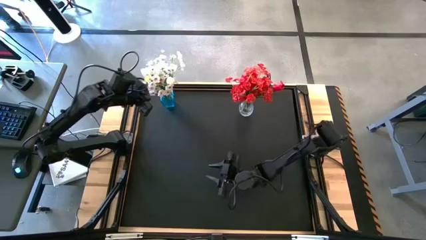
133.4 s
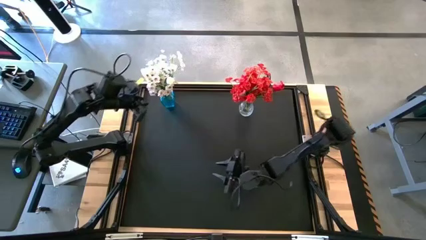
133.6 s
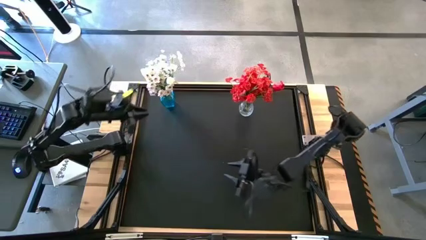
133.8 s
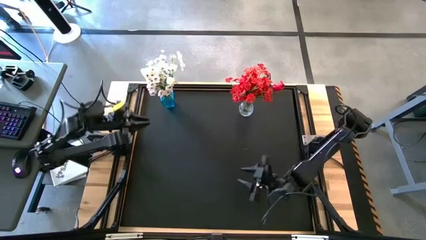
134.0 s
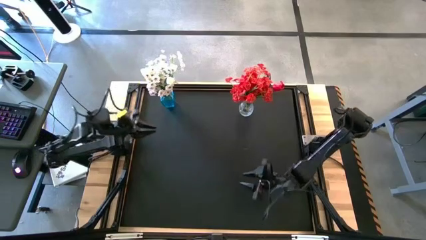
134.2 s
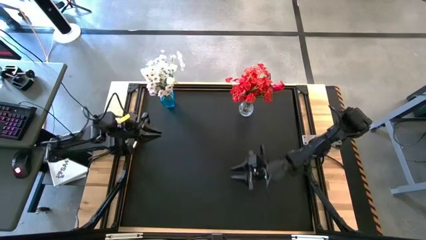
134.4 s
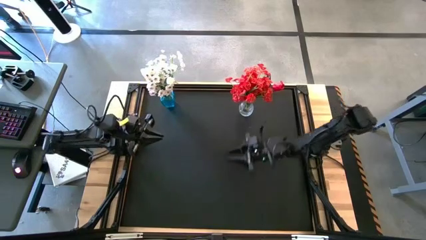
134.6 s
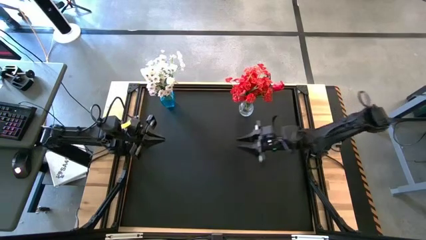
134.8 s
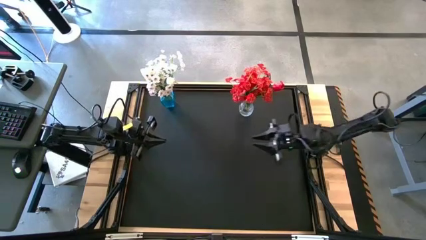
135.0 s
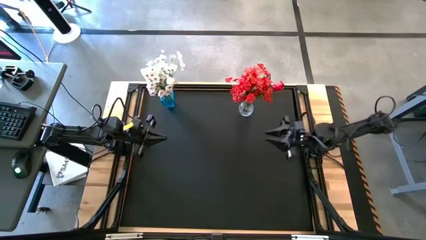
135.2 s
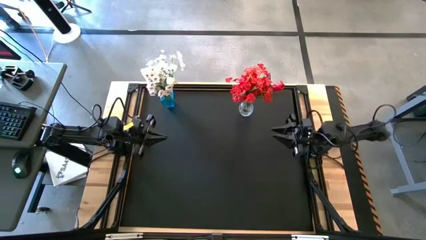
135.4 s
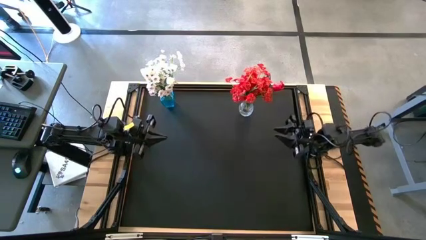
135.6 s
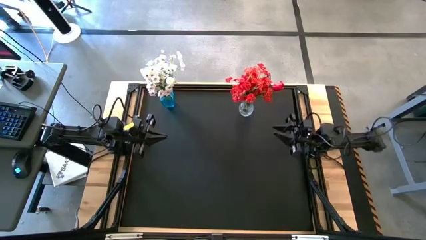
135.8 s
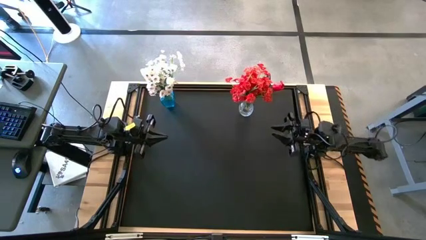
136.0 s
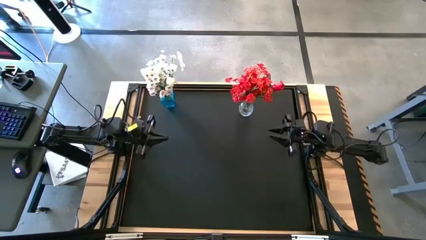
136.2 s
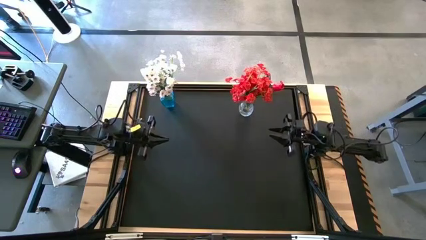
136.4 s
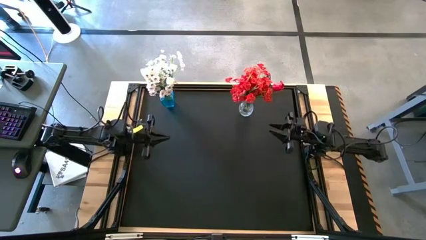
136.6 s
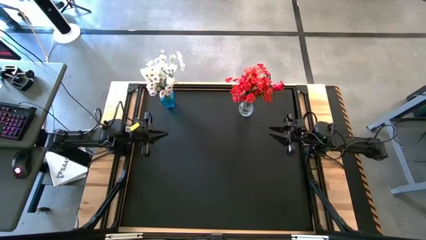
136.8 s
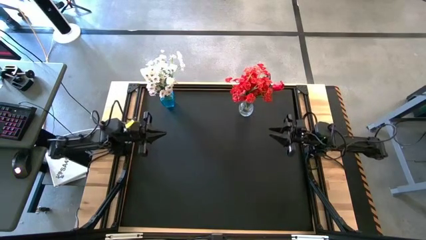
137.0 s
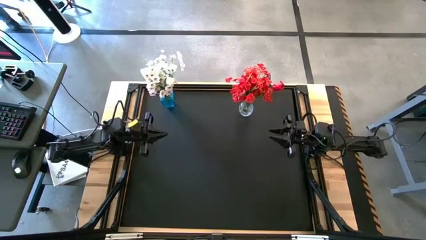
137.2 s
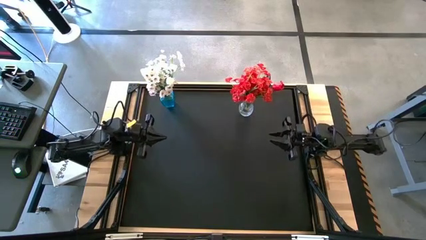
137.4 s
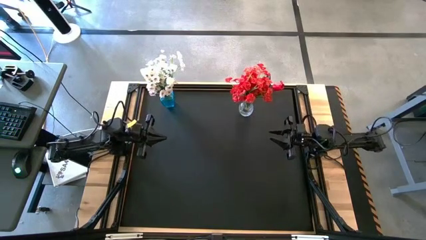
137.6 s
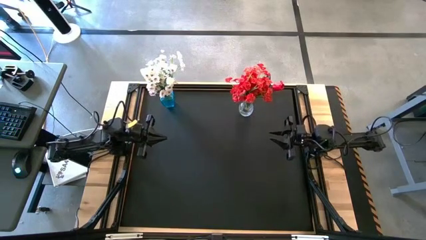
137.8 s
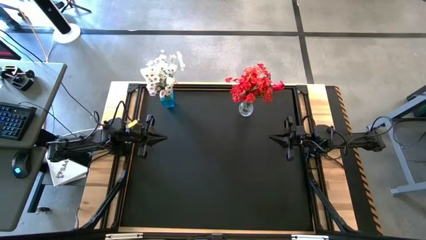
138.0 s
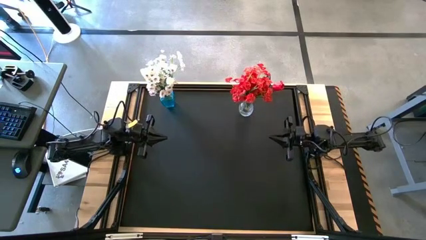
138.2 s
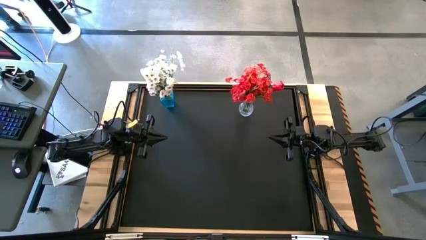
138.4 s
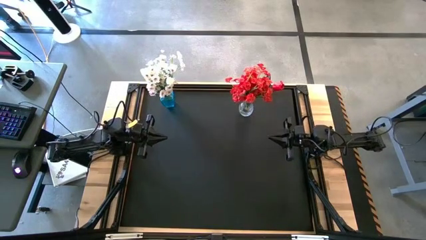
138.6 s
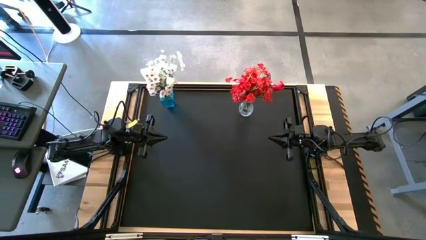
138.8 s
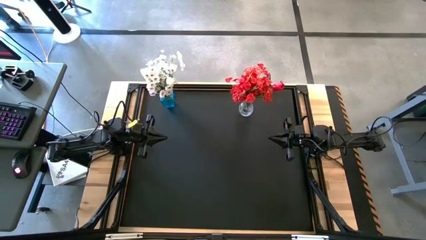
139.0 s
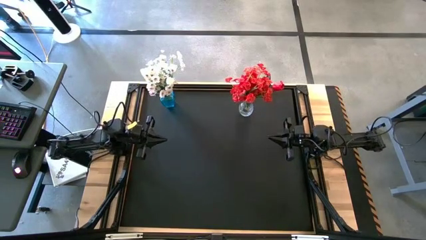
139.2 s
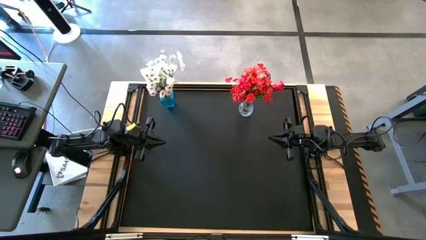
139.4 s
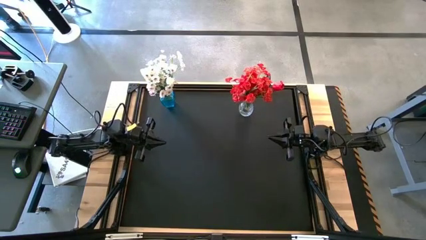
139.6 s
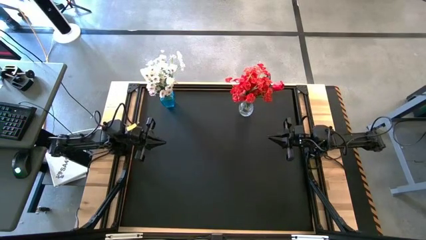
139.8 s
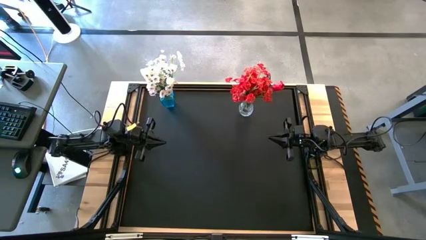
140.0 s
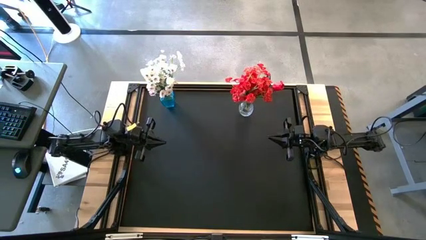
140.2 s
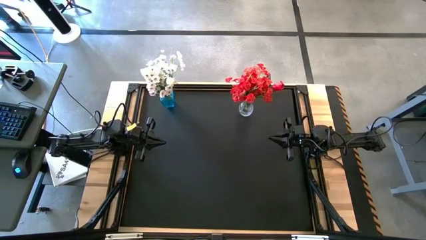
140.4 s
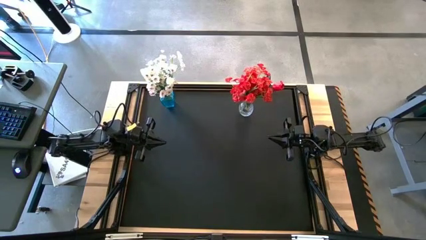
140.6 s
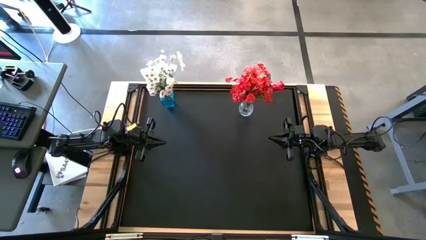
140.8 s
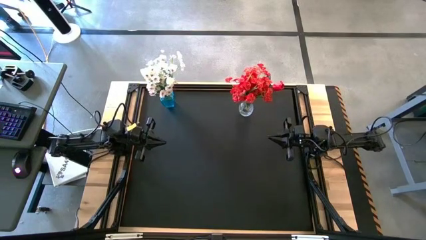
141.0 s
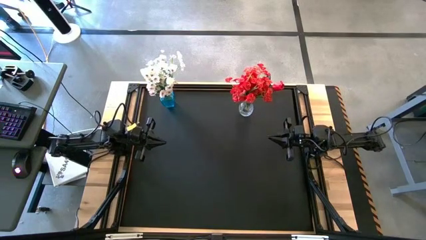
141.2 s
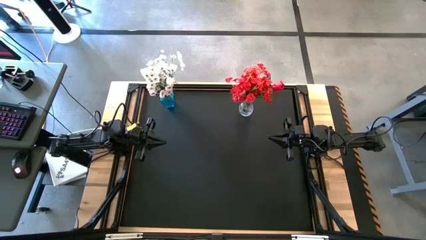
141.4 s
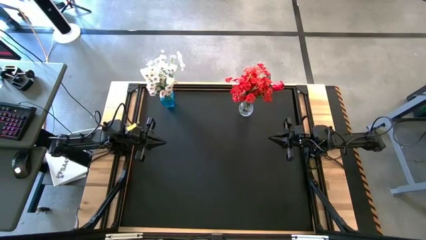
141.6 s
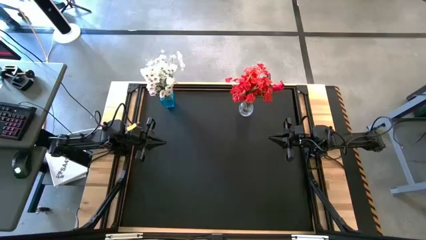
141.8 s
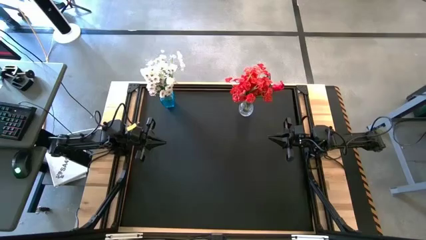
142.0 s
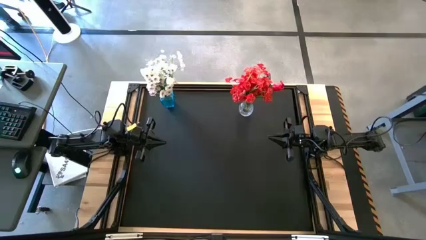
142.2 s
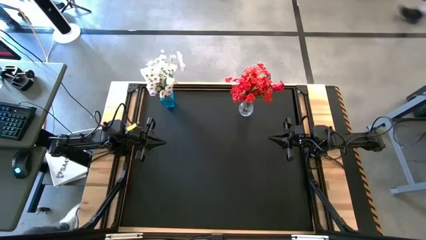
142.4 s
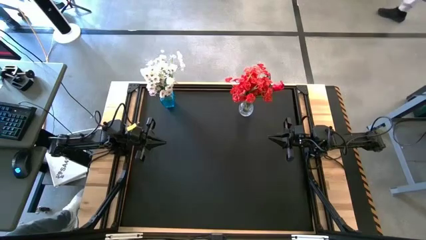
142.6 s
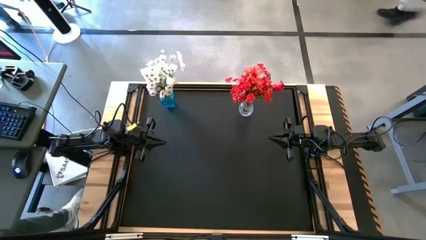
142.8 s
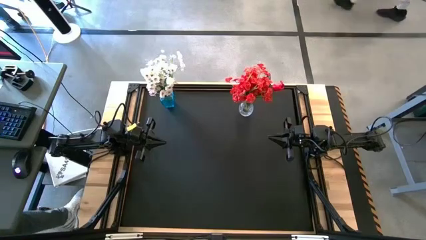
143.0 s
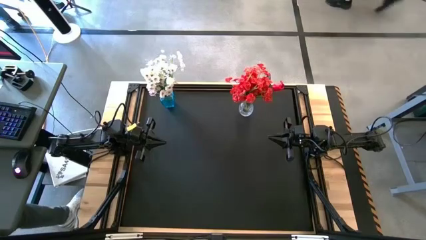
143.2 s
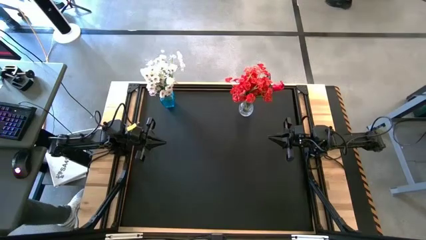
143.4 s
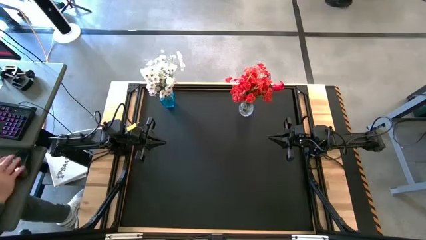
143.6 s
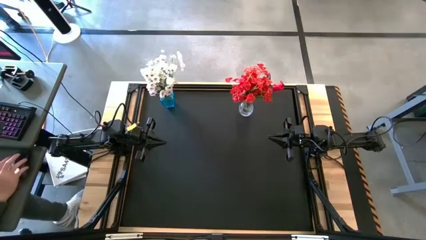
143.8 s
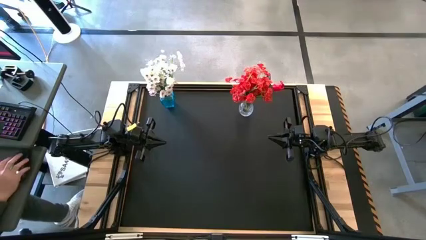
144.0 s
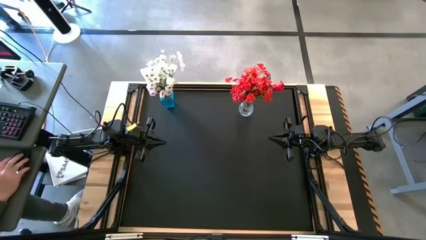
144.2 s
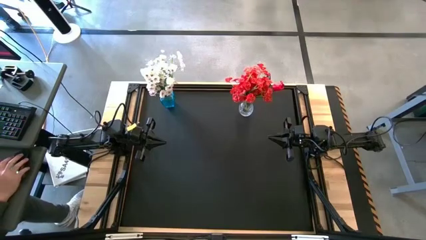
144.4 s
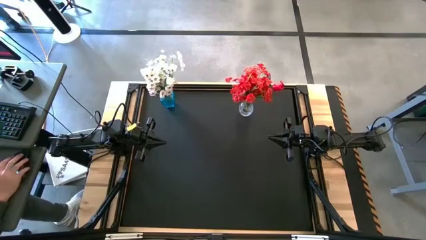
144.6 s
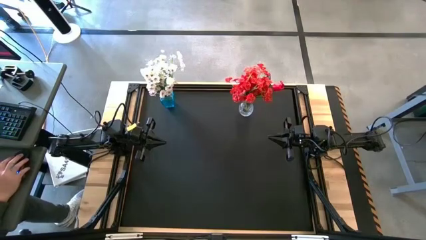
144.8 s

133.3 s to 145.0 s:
Task: Sort flowers into vase by color
Return to Home Position

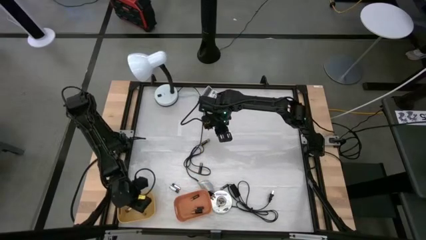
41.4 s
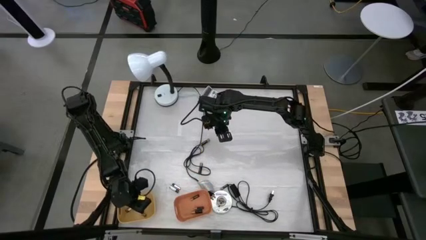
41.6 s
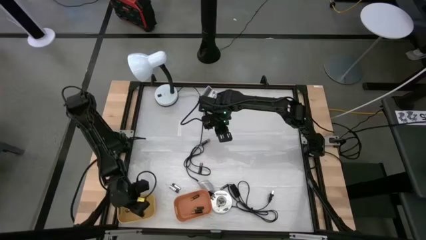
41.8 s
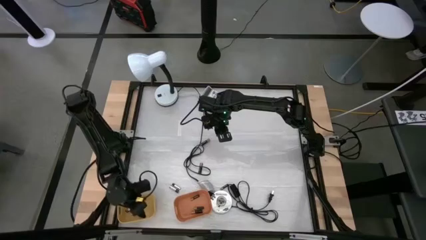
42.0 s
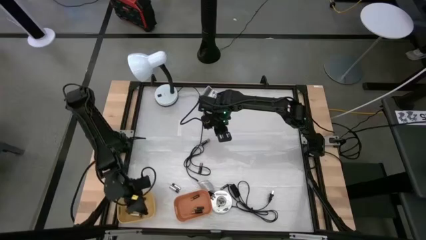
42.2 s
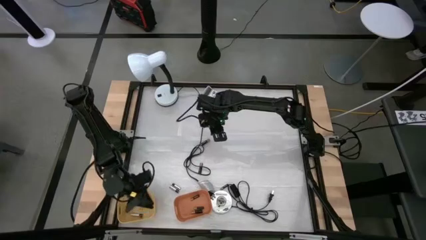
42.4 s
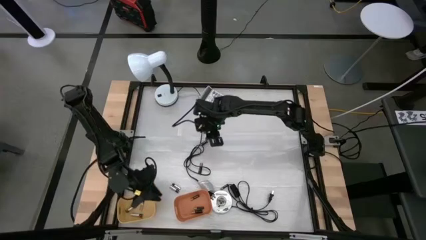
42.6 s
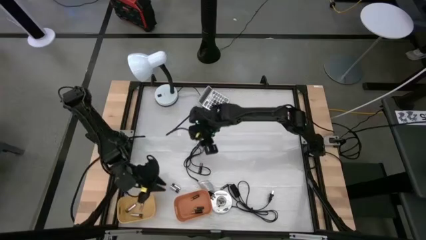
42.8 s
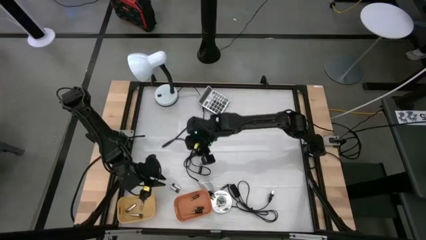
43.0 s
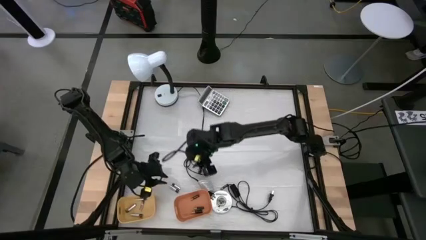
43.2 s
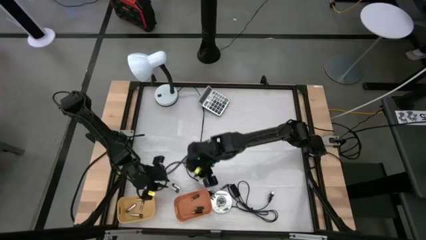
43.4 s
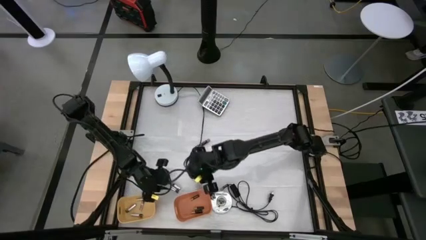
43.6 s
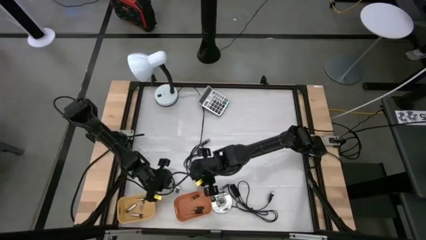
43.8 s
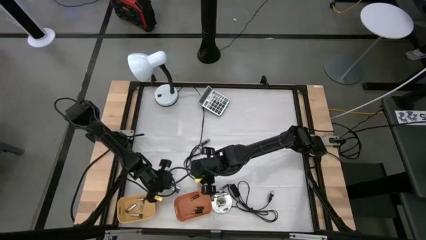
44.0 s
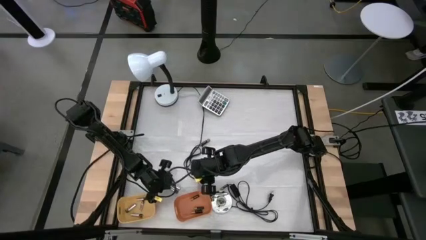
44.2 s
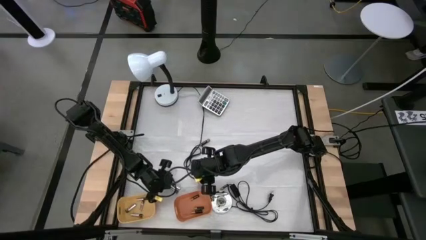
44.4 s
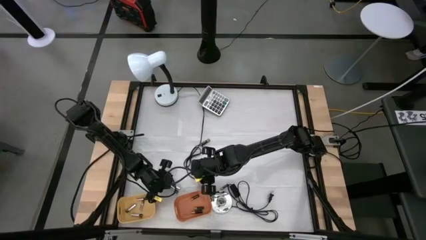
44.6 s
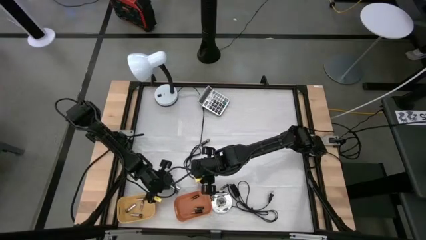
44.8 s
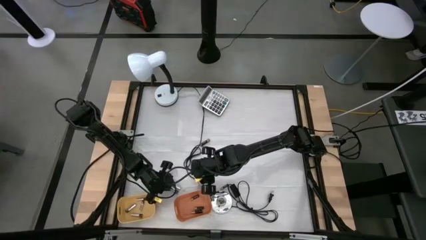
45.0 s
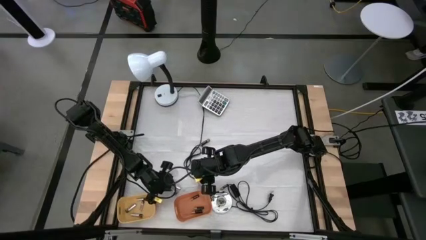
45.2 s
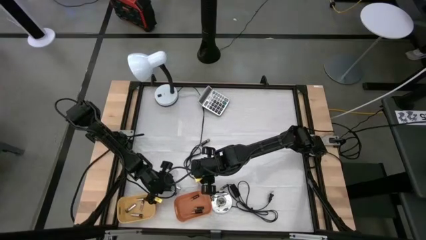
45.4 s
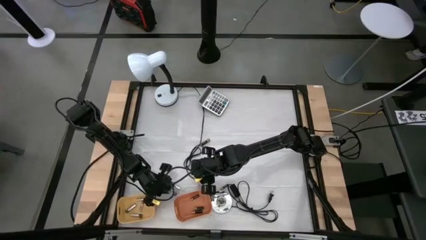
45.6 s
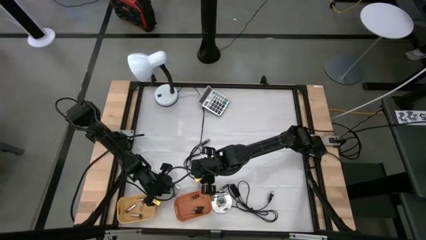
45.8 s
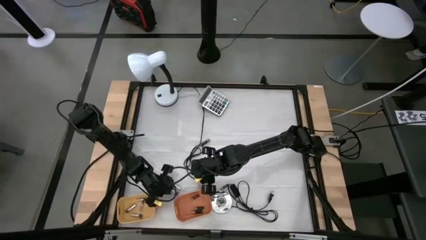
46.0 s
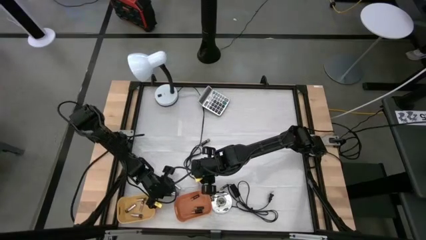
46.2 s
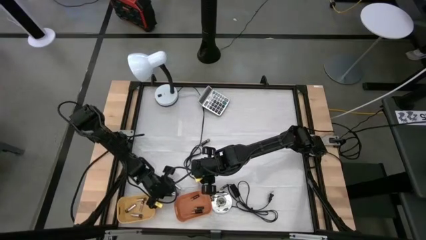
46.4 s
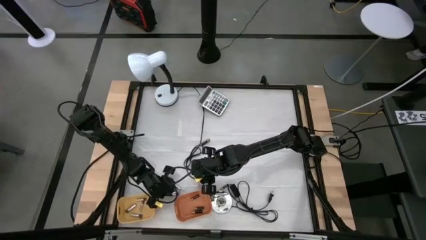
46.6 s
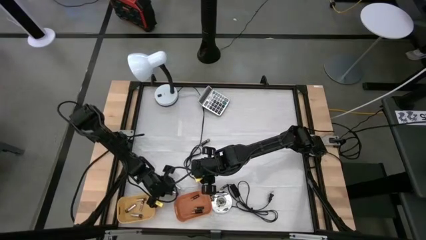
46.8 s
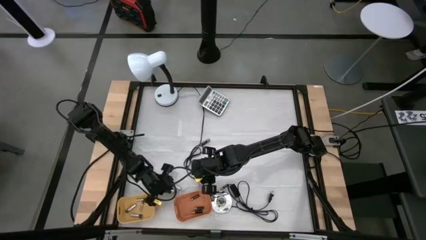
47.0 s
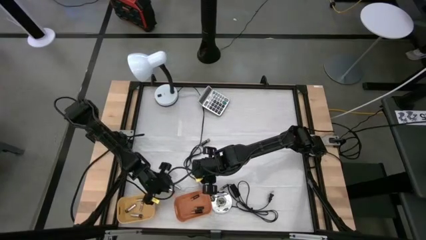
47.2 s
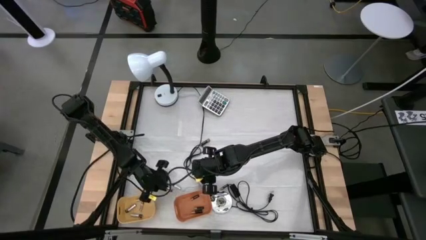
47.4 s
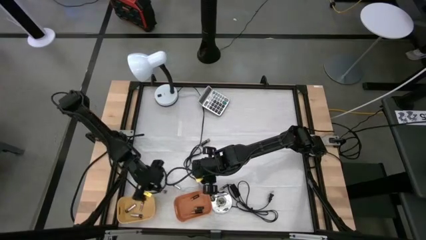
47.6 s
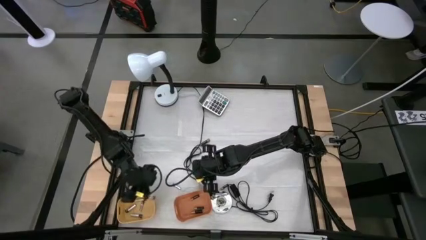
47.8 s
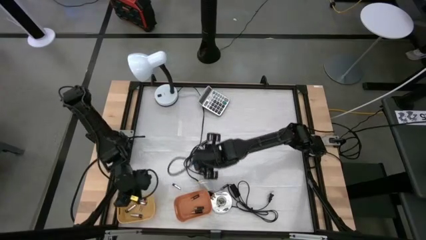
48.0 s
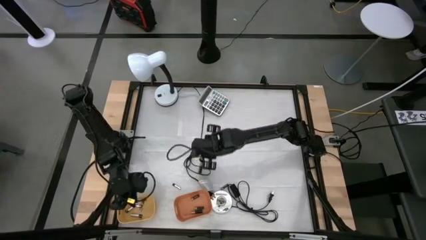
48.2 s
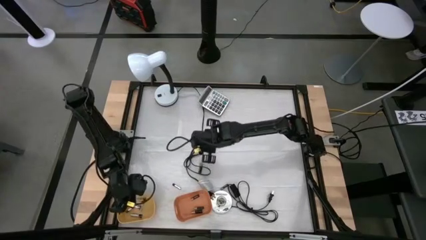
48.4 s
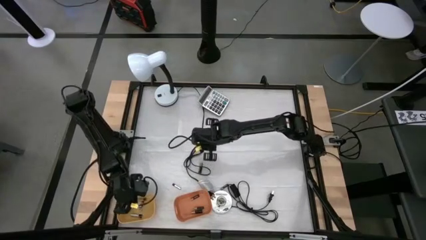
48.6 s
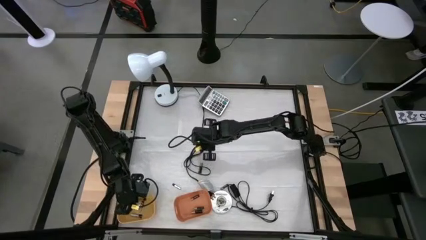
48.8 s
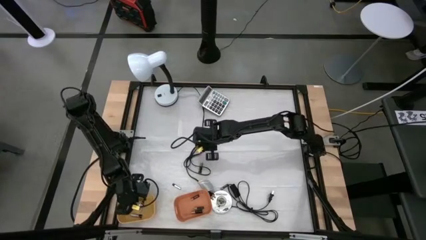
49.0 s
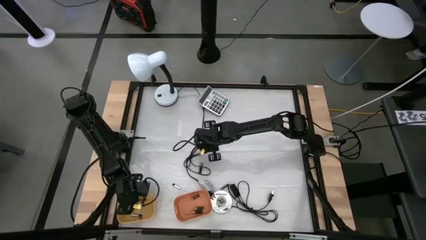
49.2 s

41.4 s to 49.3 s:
Task: Sort batteries
Put the white battery into the yellow bin
